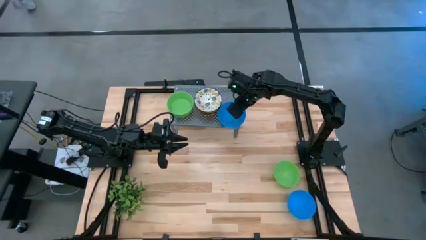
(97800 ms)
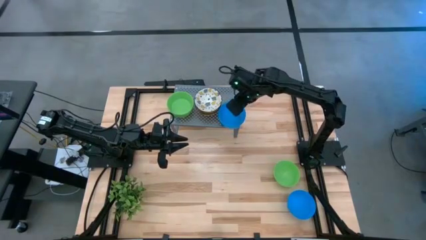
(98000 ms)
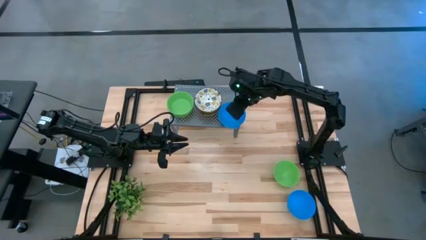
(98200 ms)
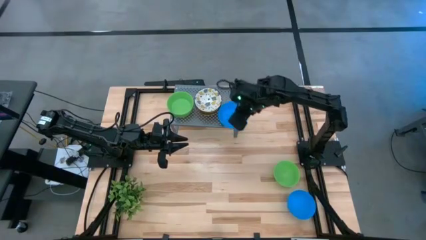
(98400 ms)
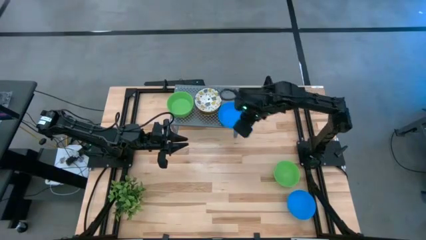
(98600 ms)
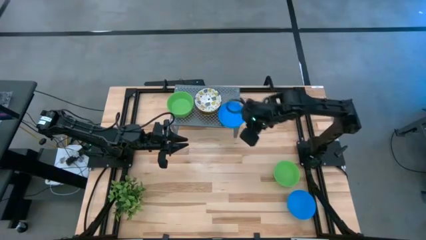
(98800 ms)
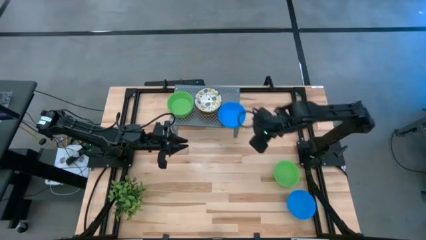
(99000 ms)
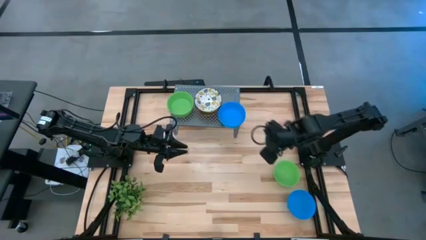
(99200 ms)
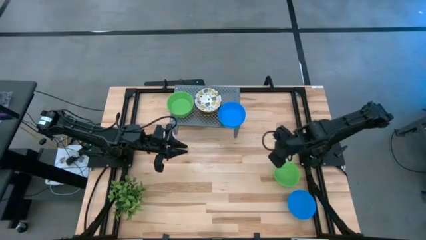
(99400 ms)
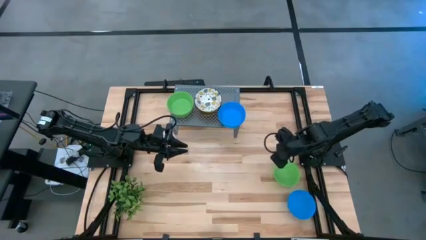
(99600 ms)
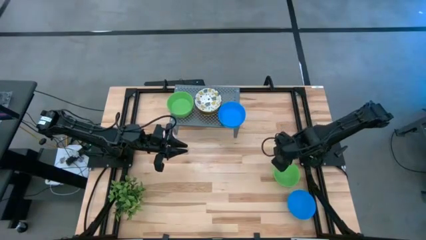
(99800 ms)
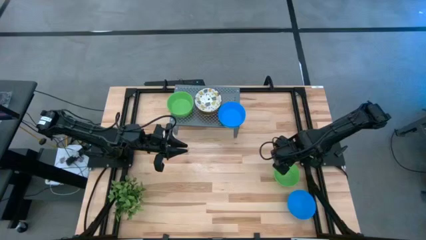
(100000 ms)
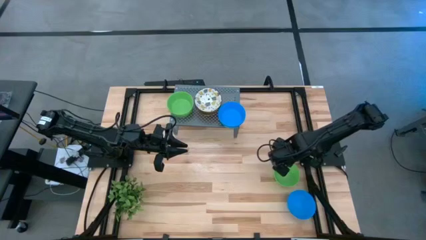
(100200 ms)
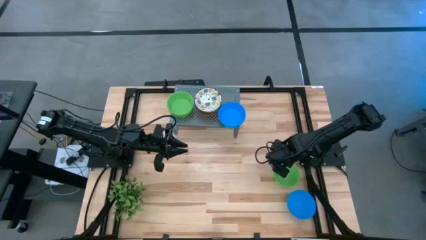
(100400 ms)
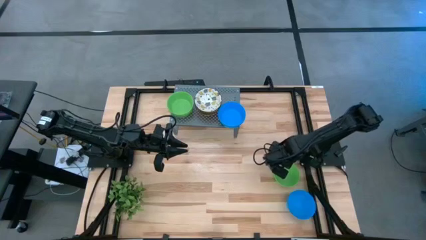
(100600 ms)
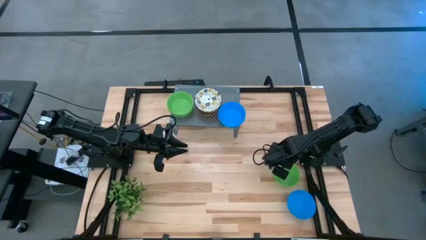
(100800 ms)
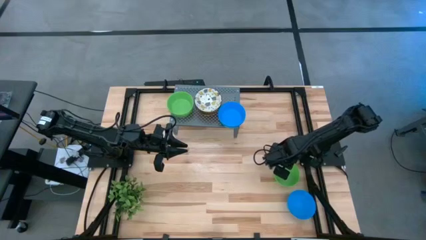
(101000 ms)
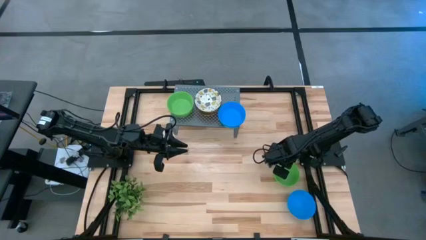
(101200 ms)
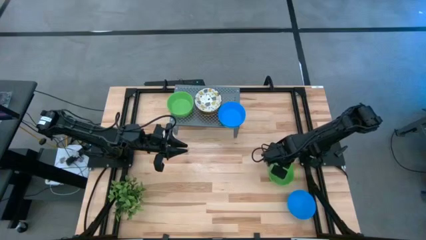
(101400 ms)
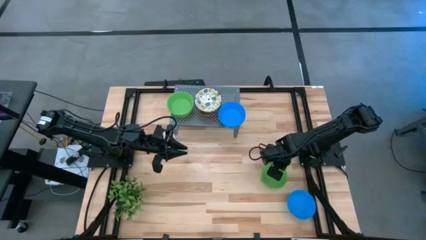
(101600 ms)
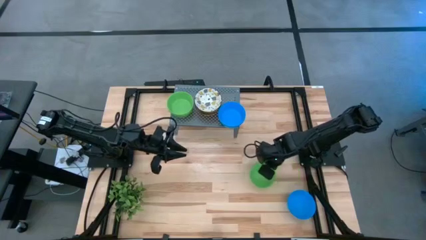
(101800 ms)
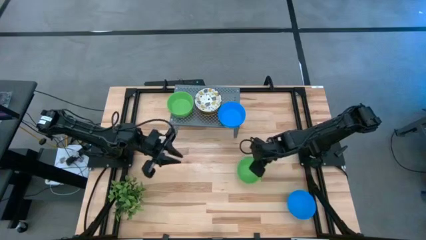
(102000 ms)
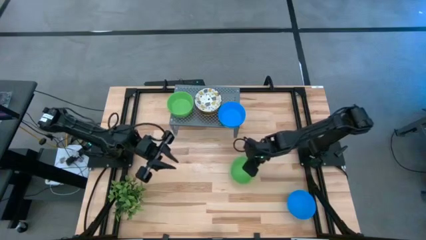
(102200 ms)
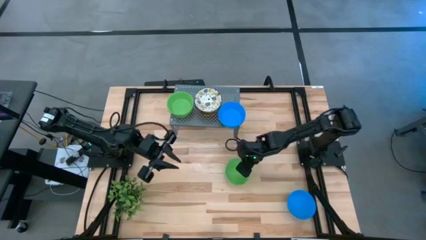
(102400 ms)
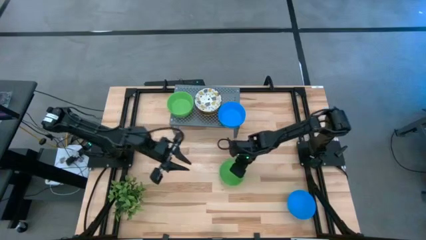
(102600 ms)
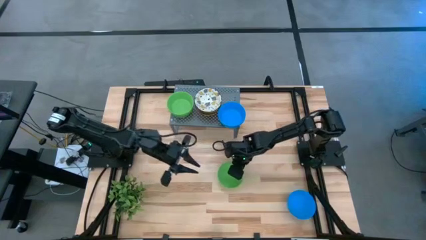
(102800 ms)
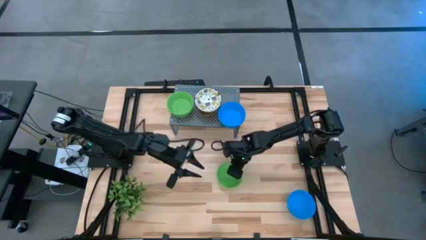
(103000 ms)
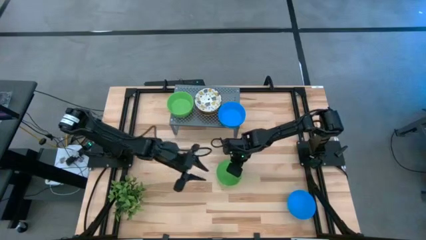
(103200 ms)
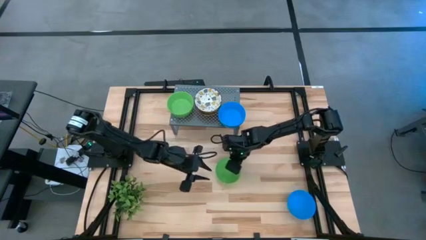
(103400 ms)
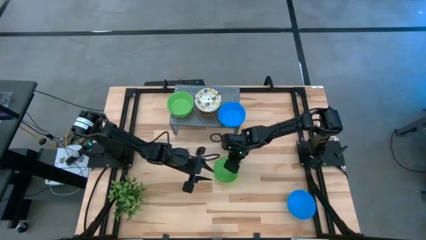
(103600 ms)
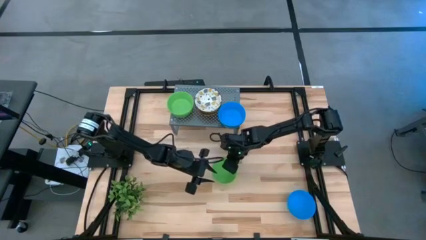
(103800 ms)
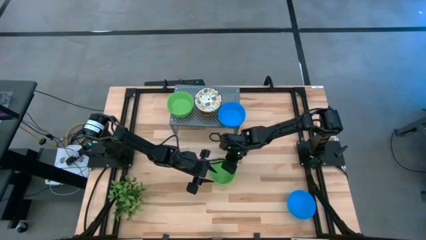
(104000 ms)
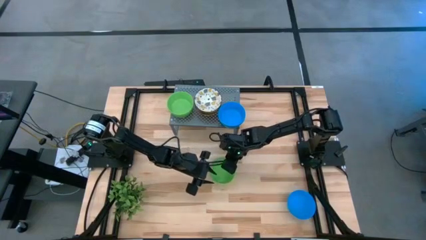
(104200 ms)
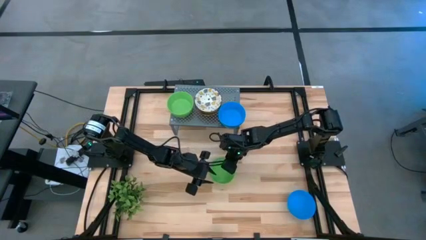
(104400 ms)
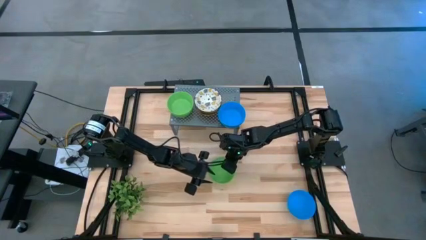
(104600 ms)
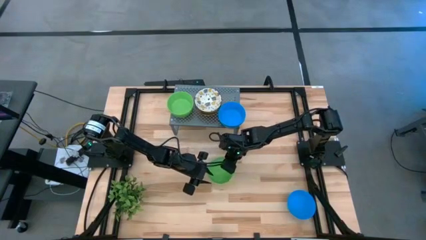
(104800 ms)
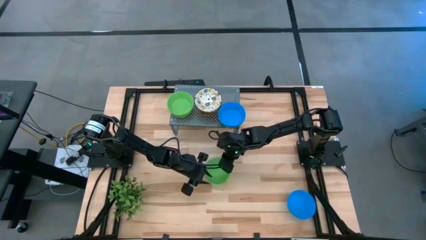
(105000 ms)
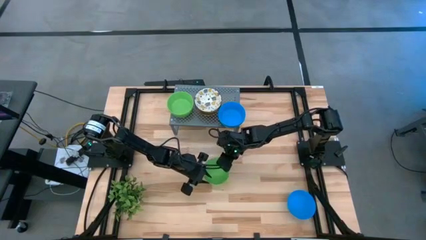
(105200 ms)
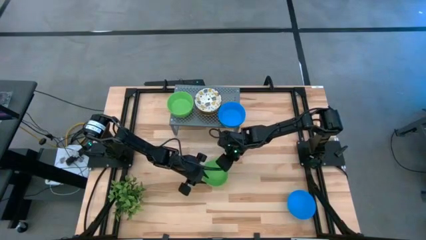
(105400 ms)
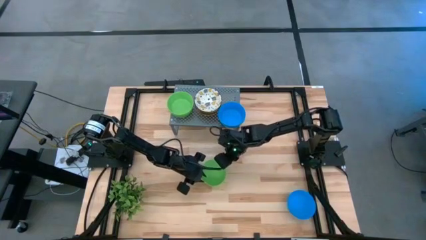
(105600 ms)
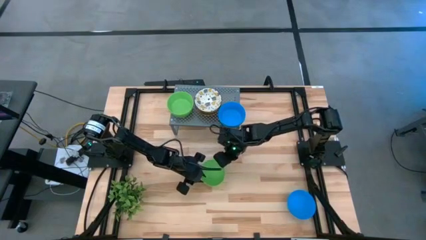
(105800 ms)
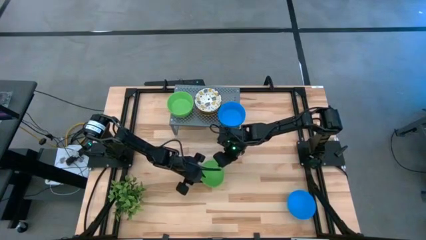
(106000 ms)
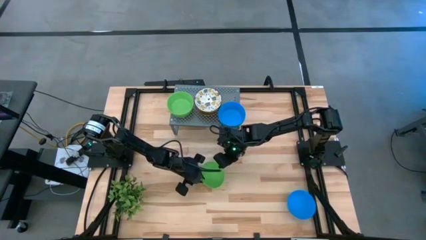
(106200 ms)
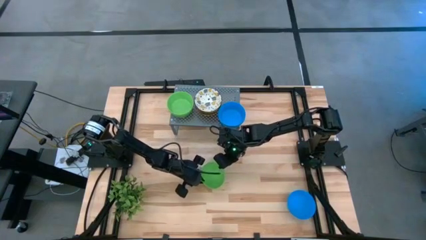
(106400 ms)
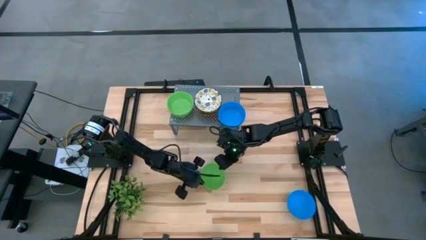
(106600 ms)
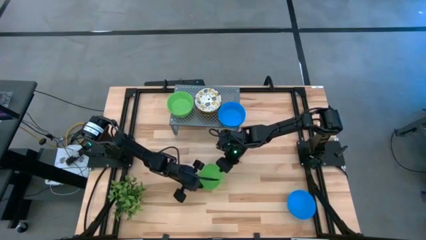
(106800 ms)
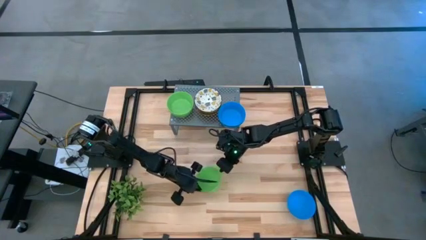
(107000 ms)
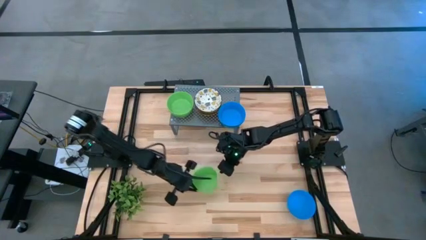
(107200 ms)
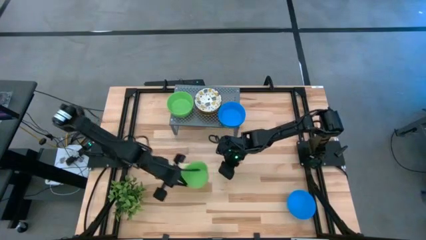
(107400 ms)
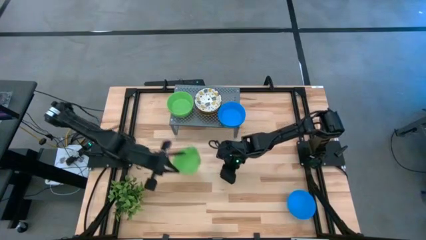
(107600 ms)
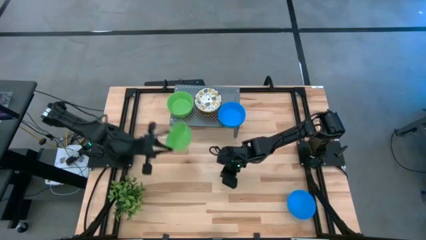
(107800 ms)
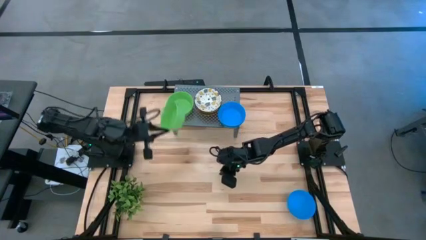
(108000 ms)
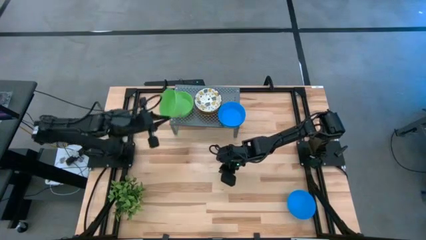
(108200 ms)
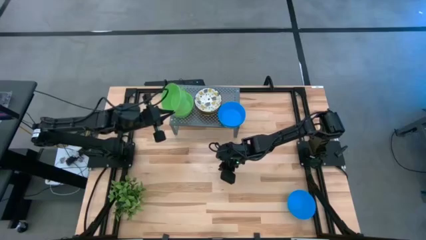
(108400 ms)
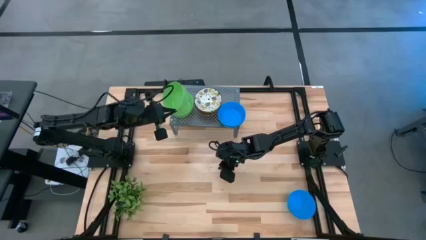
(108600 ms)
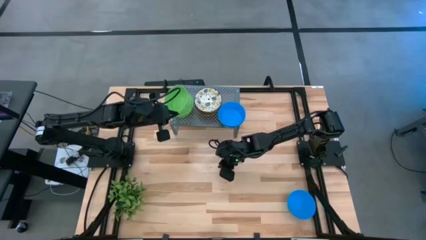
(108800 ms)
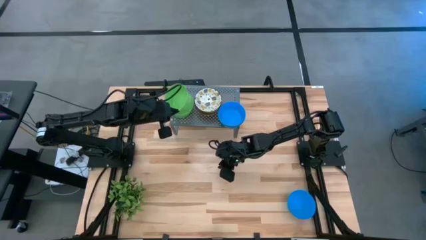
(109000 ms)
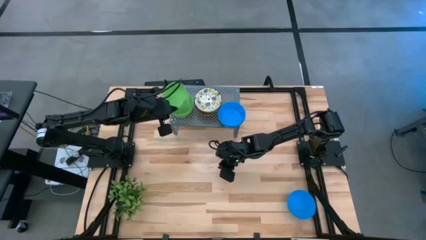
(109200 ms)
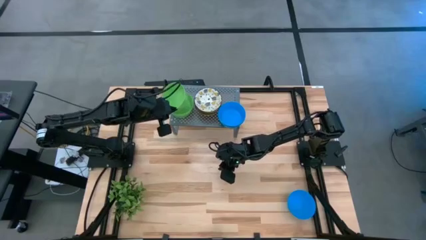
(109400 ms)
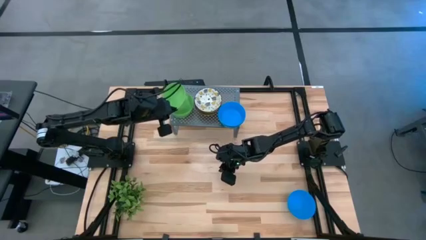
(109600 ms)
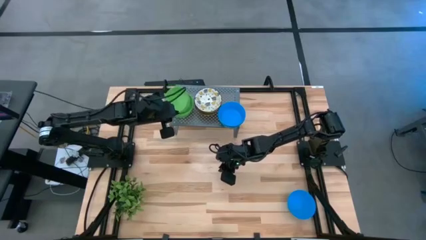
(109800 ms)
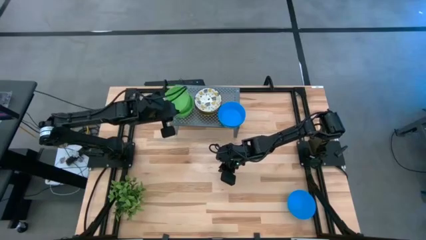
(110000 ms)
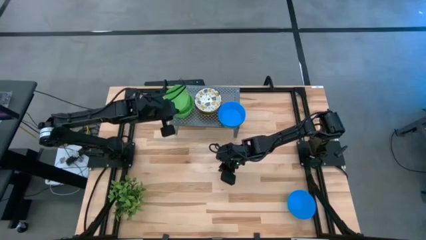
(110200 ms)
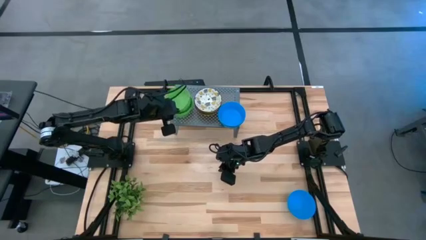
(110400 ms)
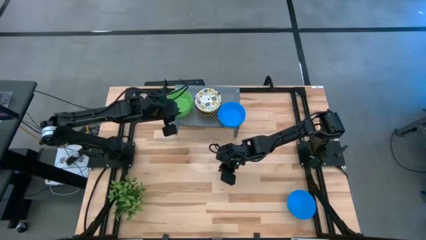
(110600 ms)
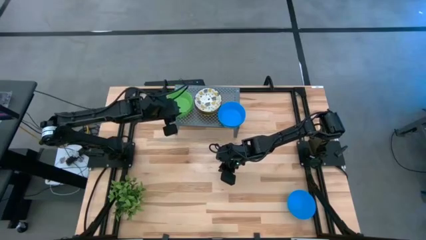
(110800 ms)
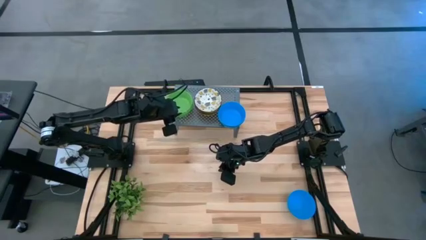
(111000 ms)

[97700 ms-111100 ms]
Task: Pick & Place Mini bowls
Stack the green bowl on top of the other green bowls on the shelf
